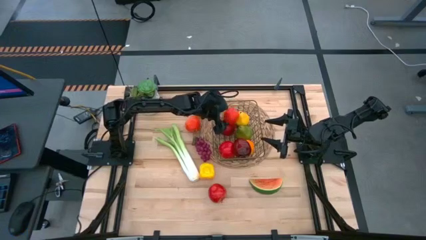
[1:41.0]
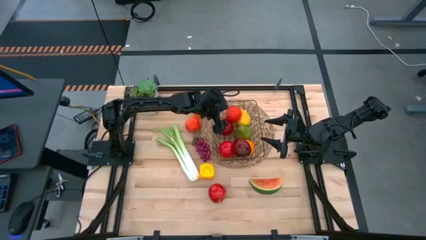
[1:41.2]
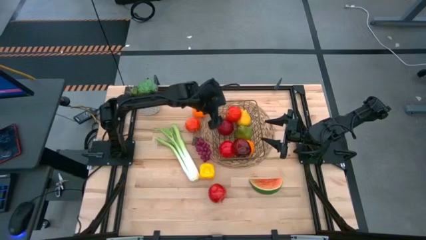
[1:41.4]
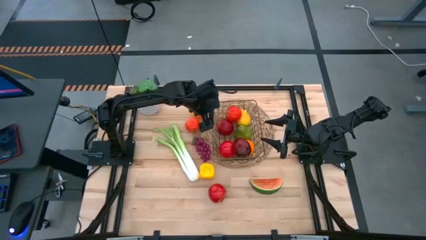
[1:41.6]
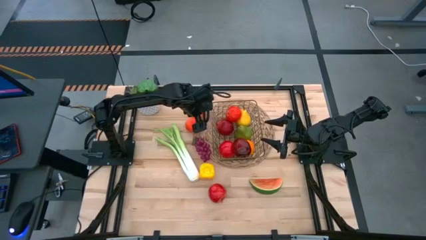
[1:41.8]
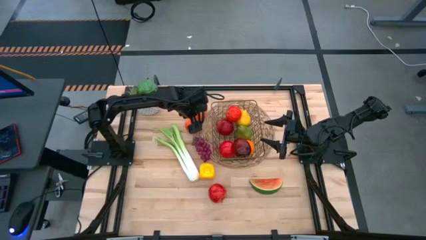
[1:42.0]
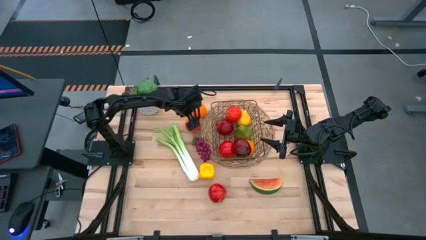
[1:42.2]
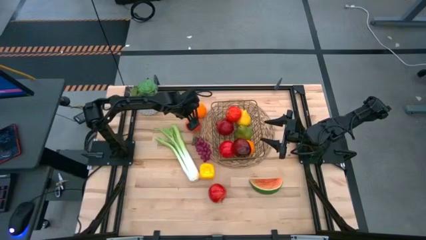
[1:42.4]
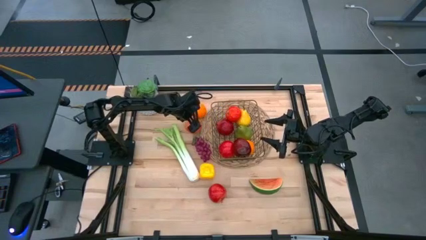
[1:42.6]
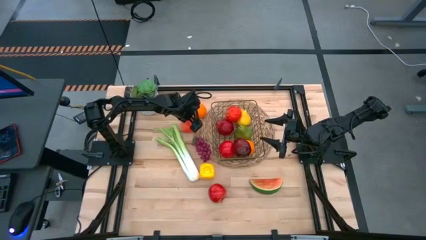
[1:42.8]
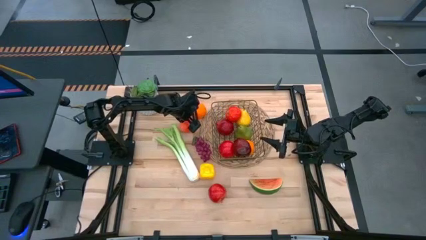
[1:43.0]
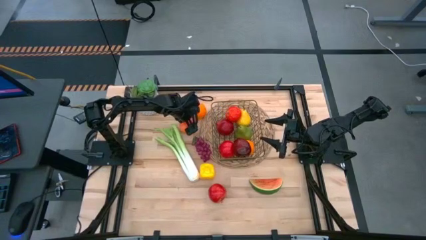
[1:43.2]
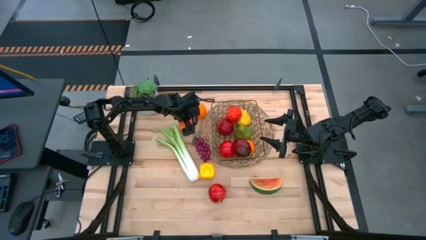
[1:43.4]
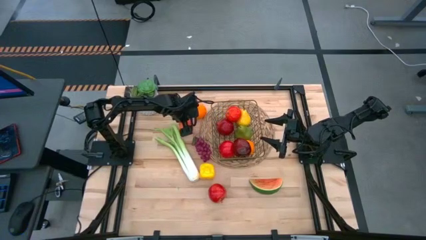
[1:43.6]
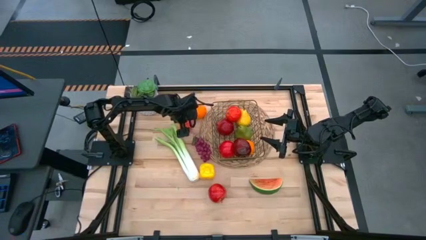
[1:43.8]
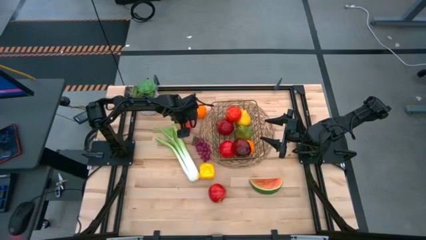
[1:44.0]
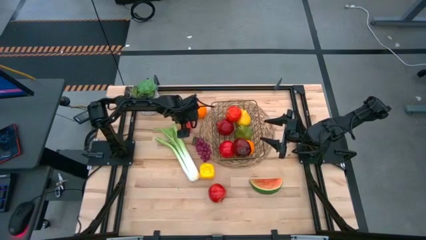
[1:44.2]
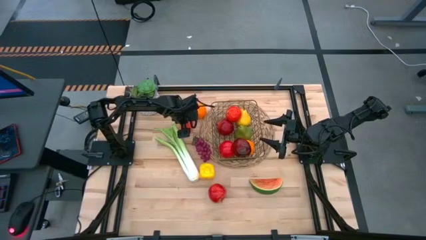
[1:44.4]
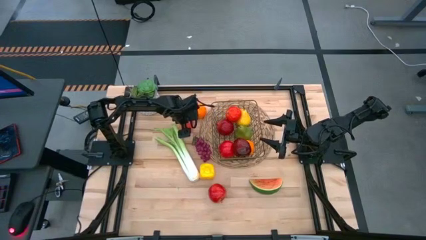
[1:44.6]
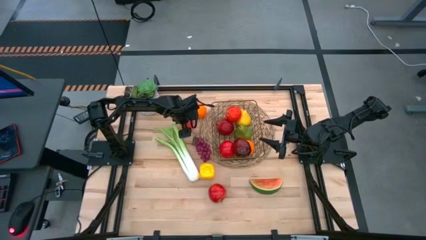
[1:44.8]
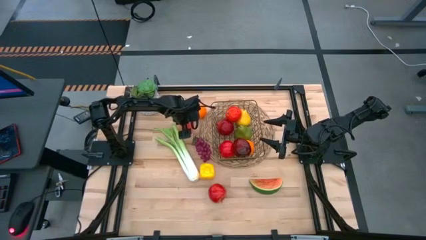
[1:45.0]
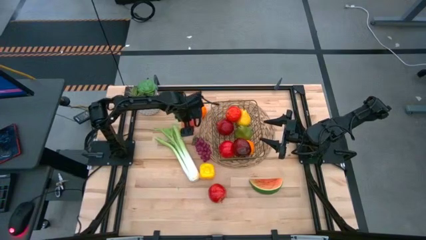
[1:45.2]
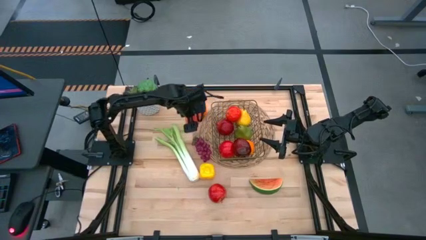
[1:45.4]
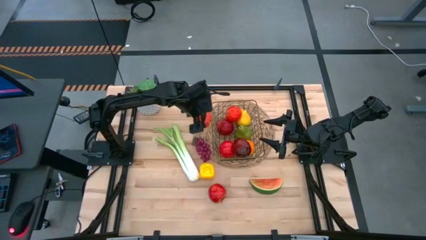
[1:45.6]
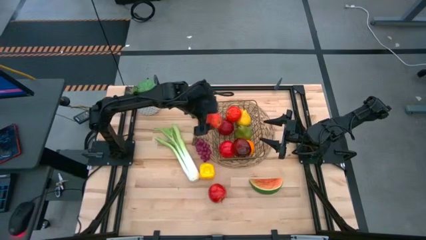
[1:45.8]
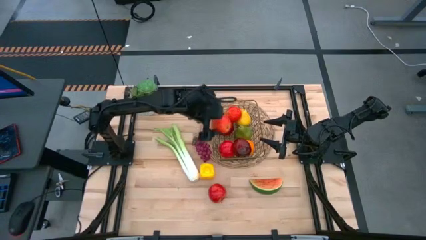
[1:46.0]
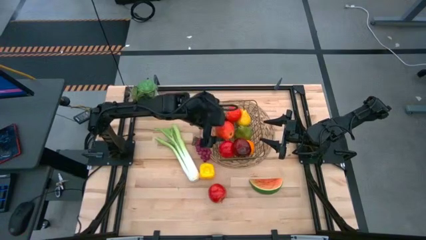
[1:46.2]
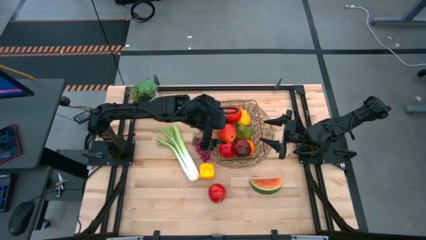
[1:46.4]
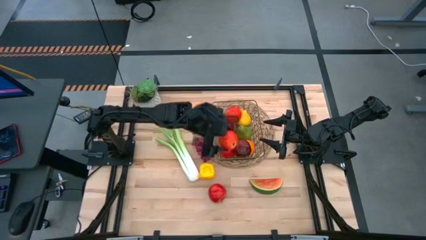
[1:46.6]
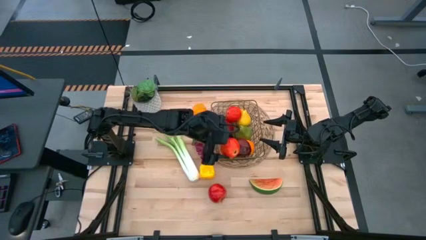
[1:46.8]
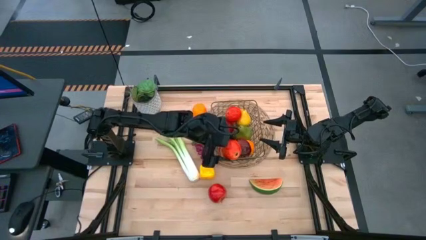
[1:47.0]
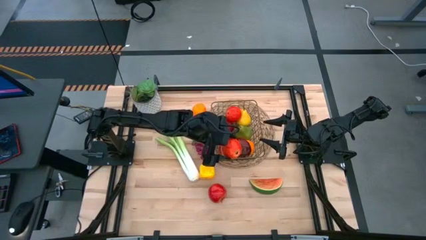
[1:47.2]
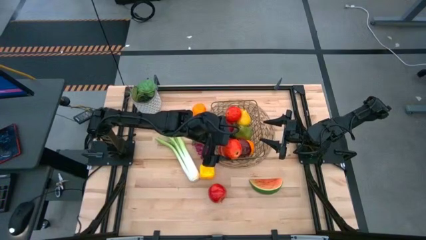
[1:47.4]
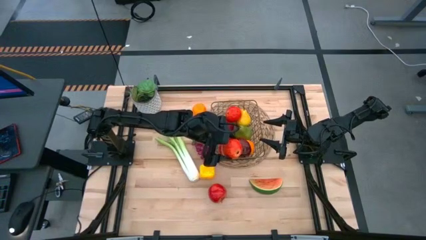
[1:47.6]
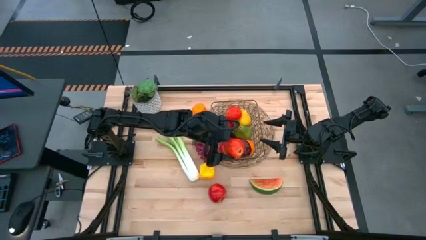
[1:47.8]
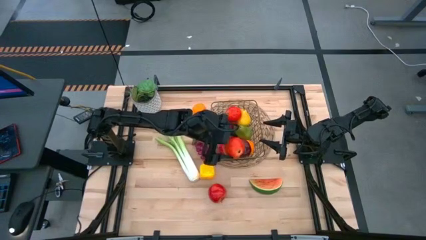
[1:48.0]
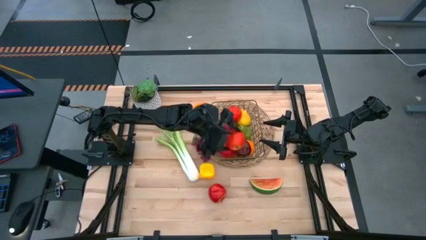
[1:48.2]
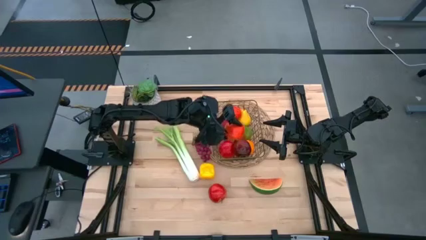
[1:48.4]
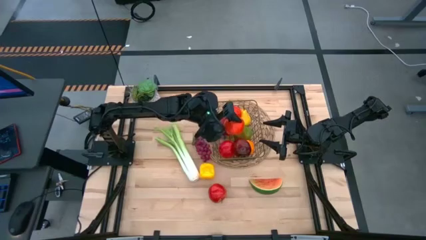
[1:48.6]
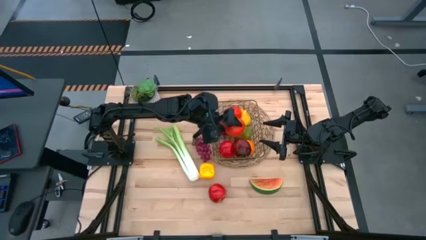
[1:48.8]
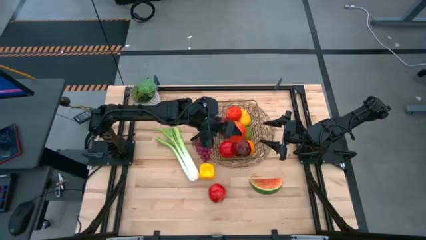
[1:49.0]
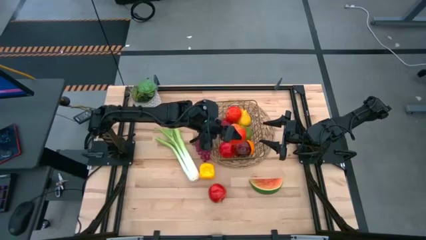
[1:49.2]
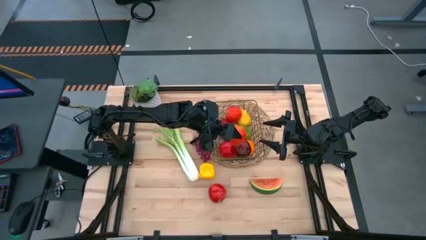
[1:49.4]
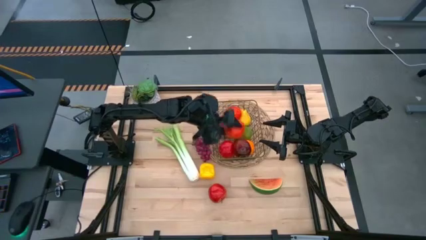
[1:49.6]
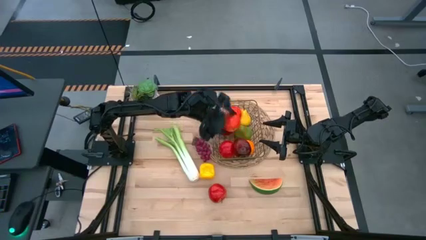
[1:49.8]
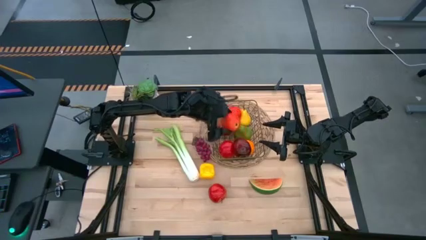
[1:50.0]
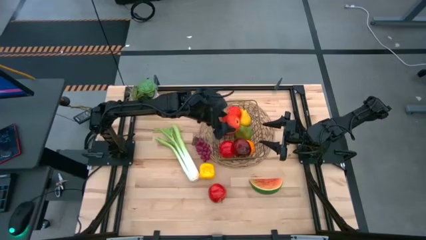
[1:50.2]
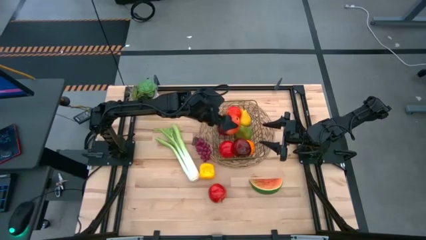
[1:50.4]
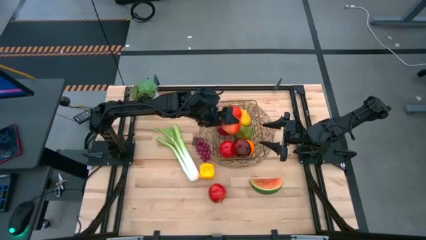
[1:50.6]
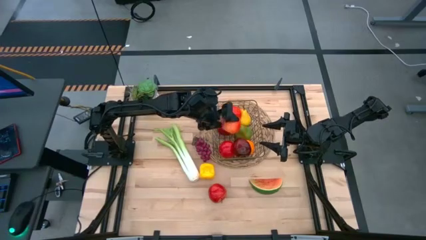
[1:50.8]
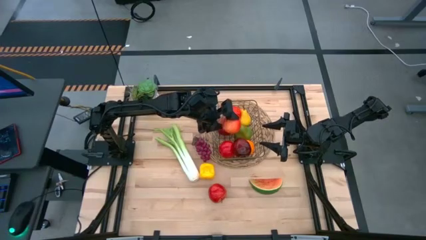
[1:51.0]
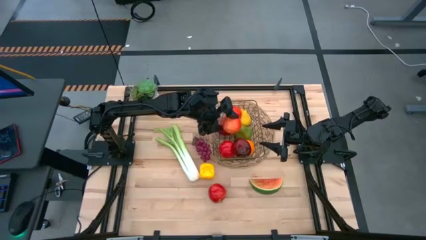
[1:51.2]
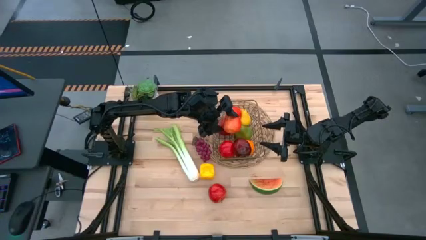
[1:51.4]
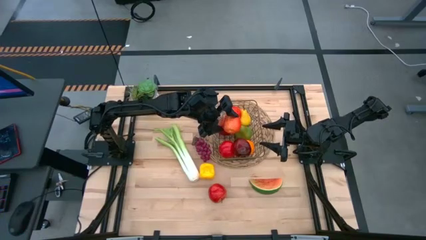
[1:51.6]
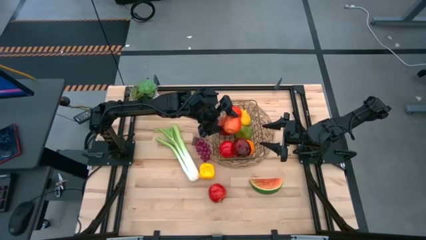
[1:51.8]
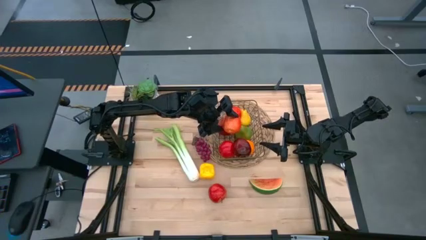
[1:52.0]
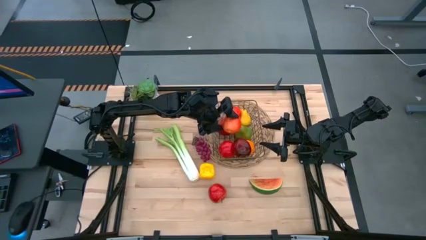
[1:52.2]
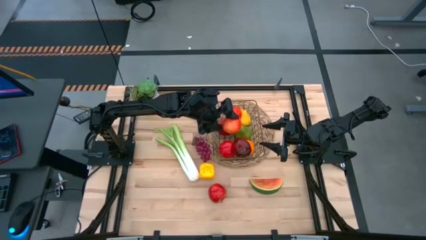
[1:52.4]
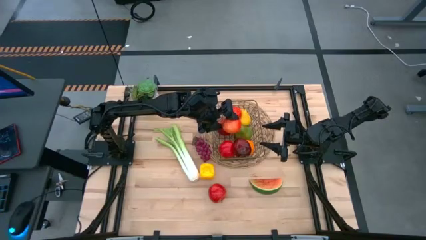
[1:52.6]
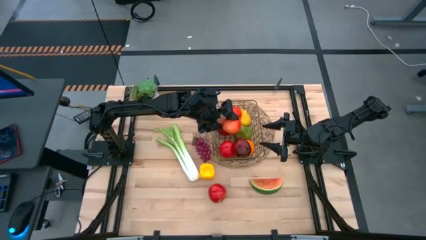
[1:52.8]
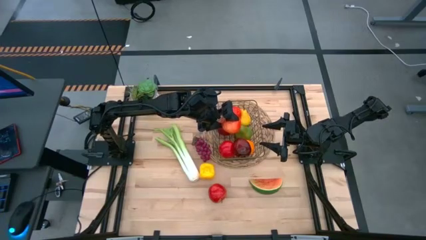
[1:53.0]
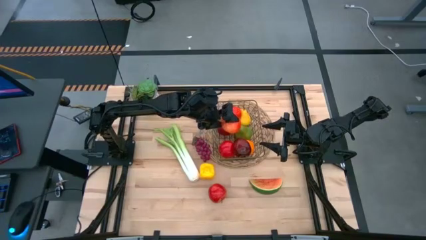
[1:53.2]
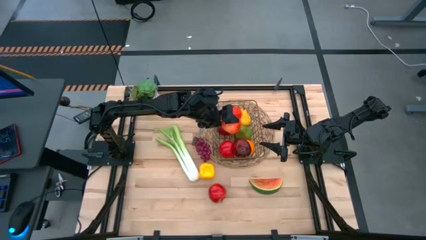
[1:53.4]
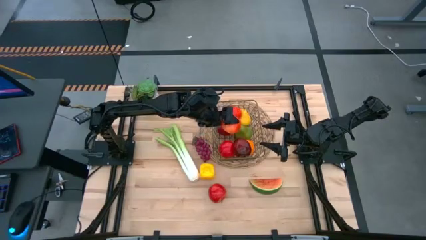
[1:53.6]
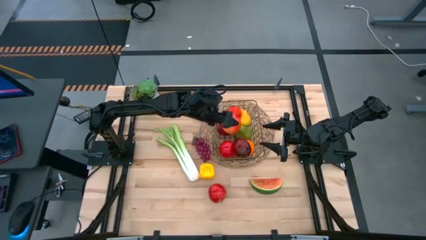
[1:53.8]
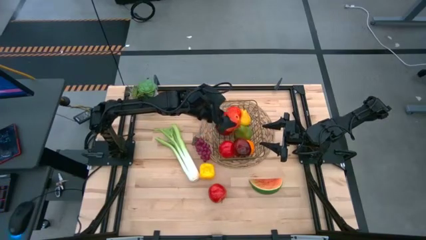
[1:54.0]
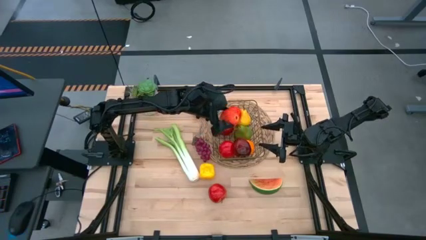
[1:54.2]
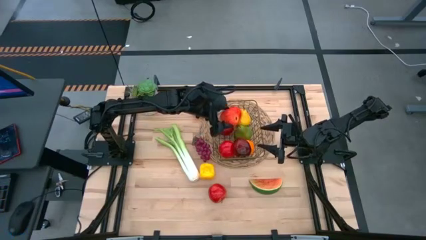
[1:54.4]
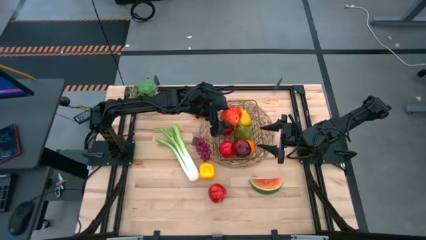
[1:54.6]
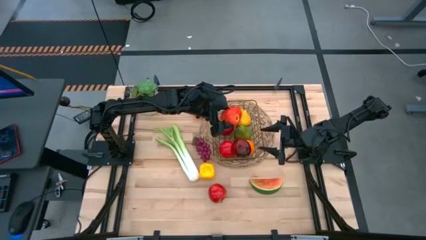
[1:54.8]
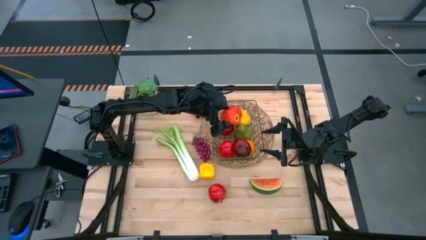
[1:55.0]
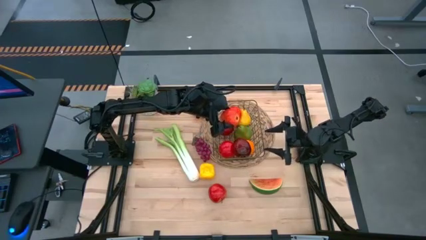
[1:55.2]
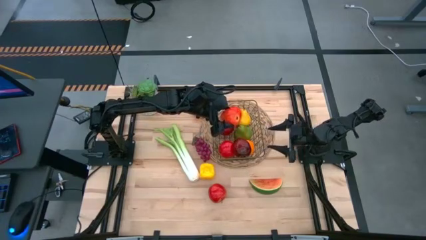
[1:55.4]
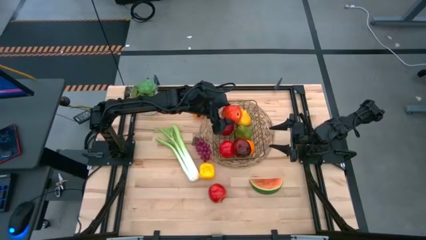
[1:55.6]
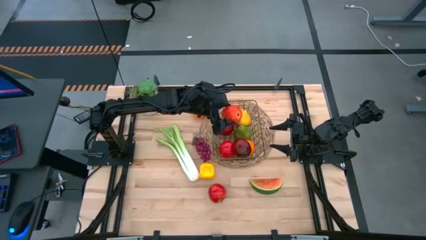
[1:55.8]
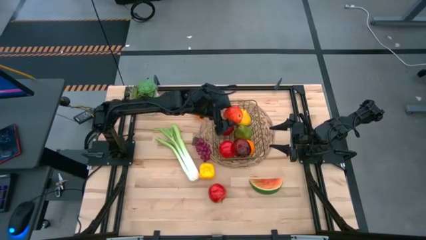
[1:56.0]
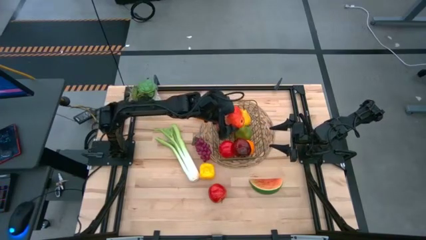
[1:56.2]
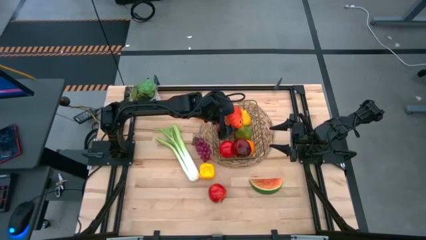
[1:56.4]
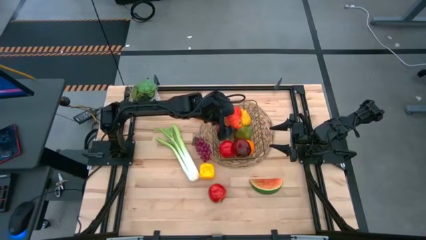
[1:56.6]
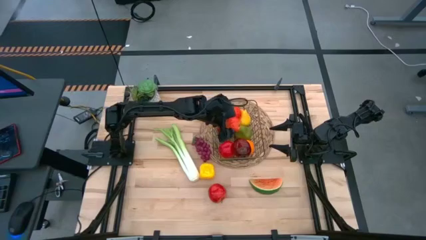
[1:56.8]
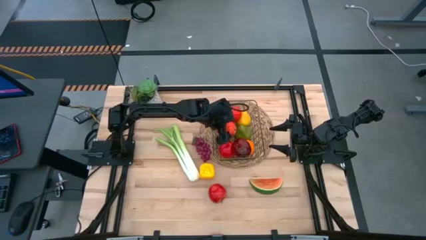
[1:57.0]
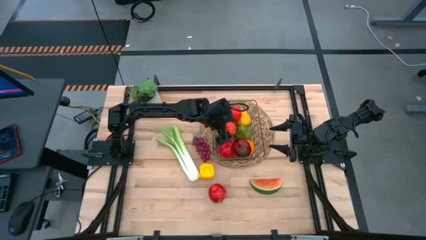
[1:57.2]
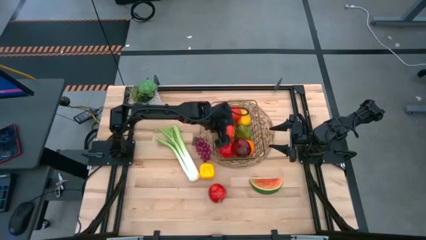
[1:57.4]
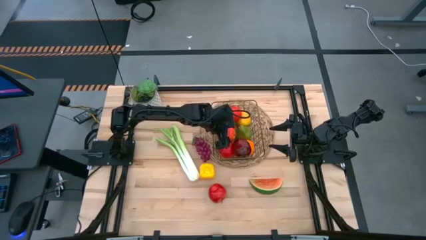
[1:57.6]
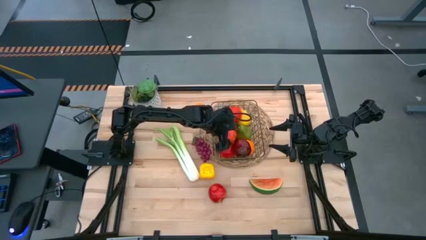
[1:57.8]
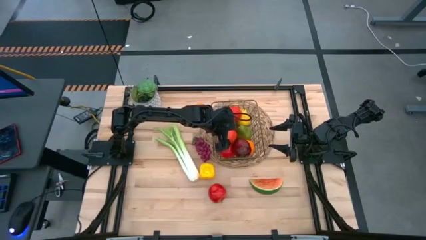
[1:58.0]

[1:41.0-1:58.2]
Task: Build produce basket
Put the apple into the wire basket
